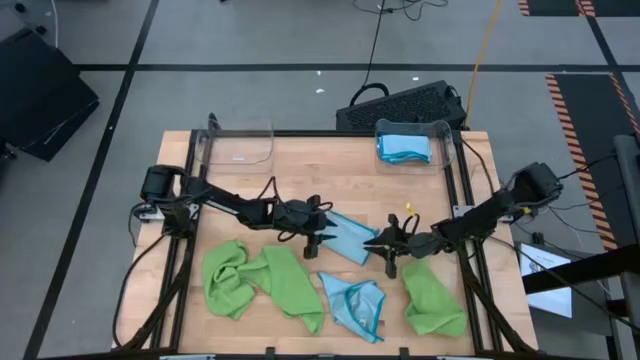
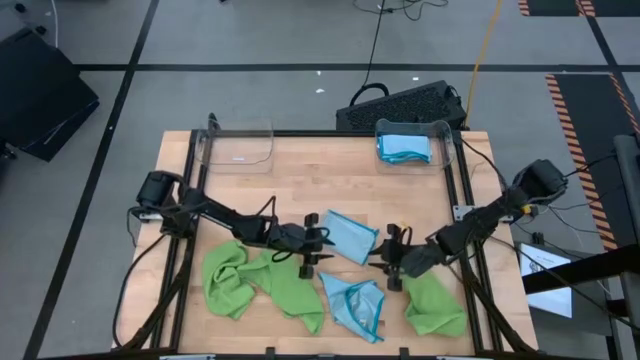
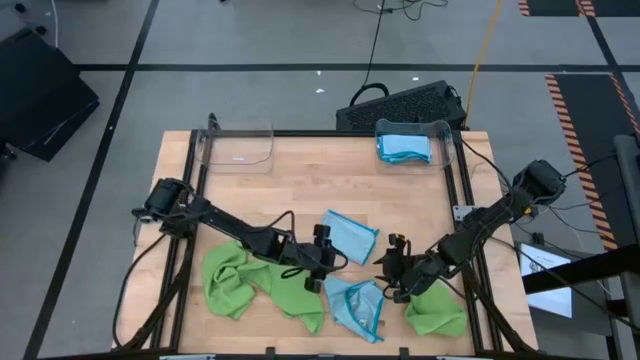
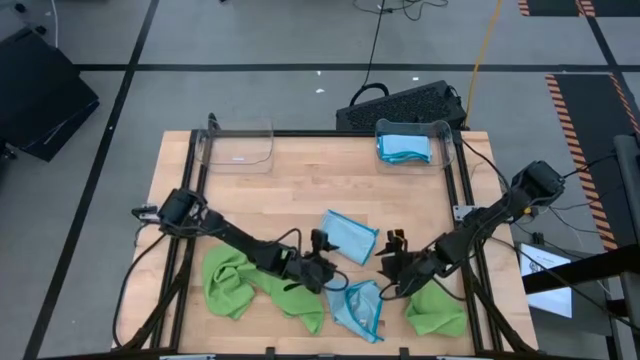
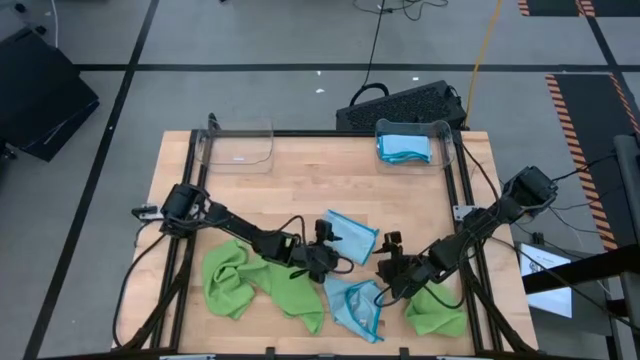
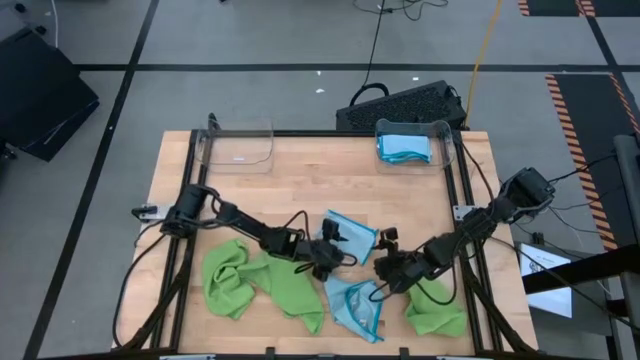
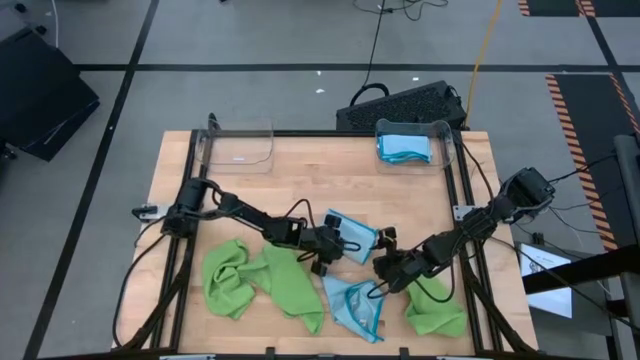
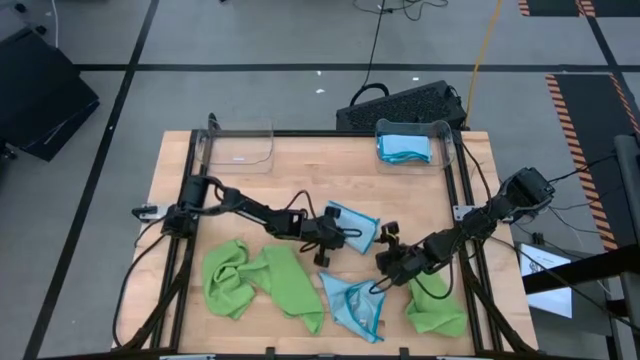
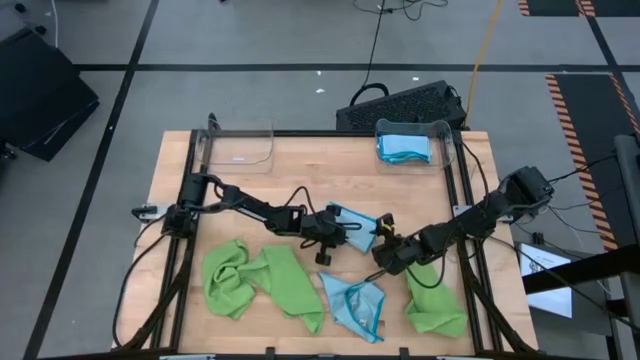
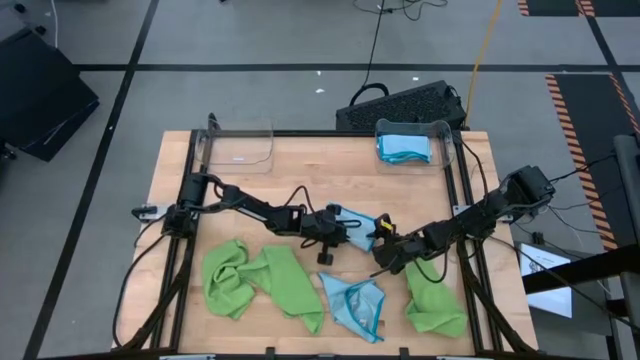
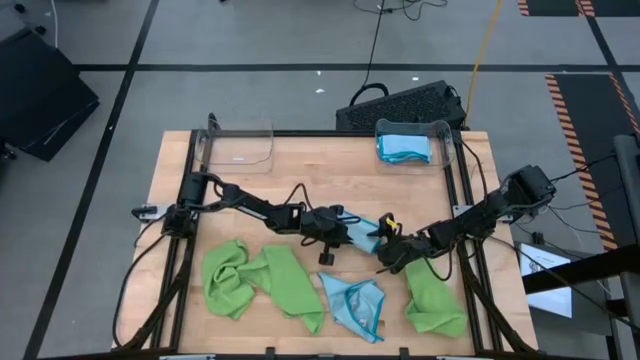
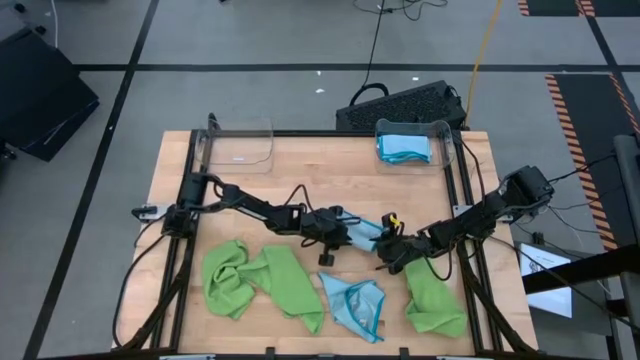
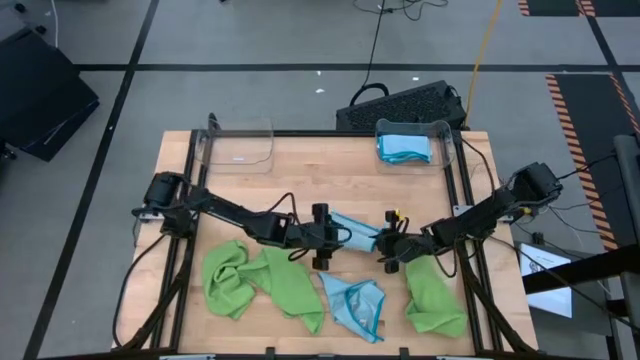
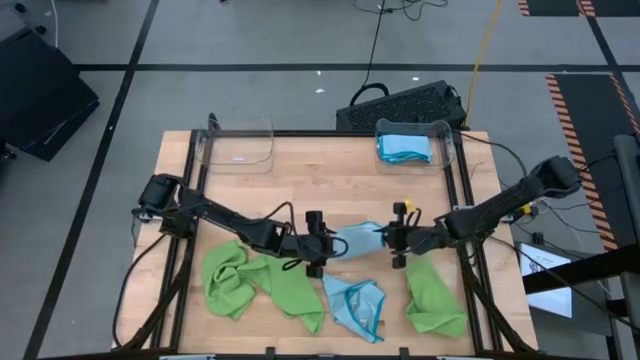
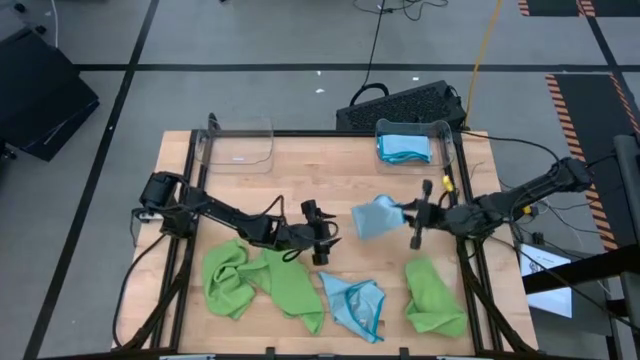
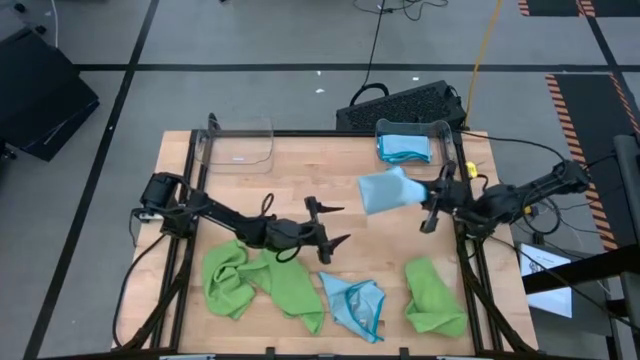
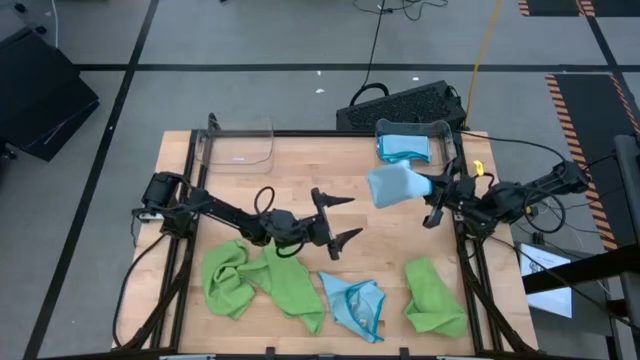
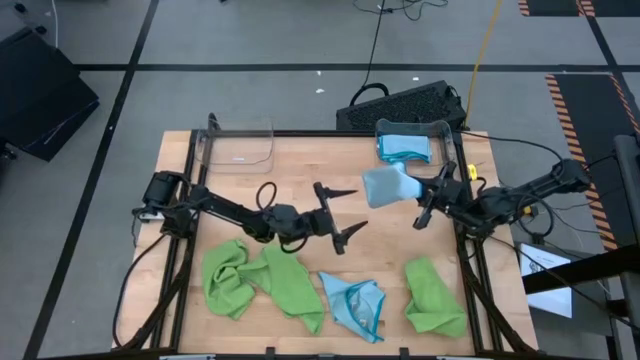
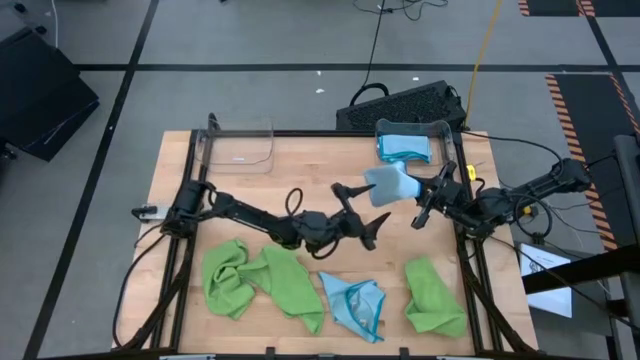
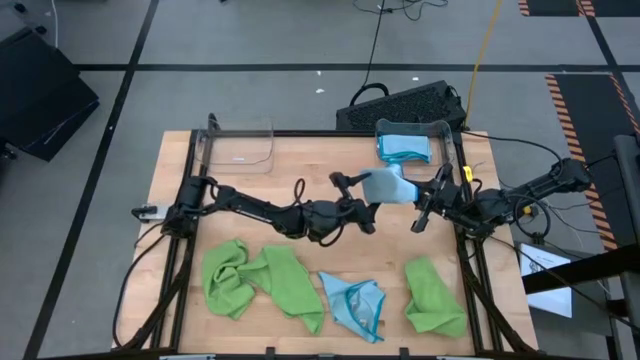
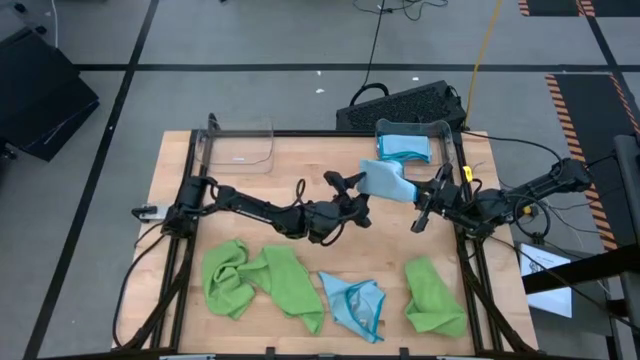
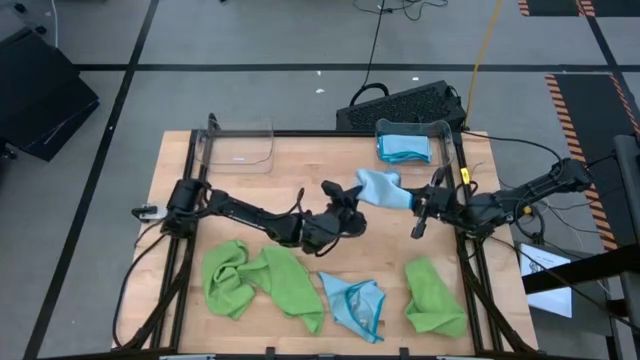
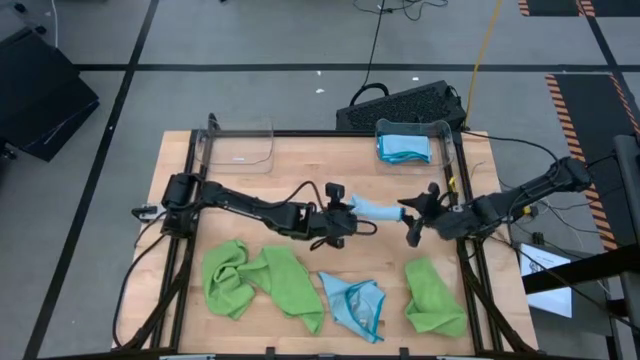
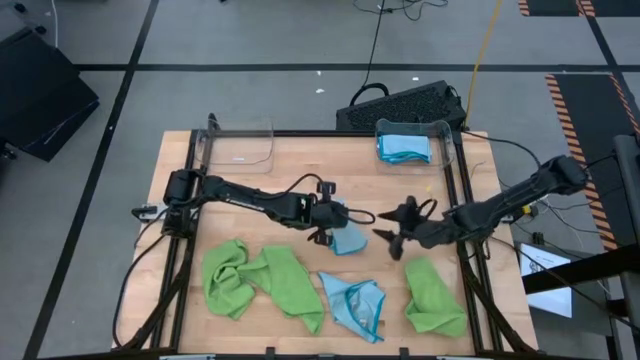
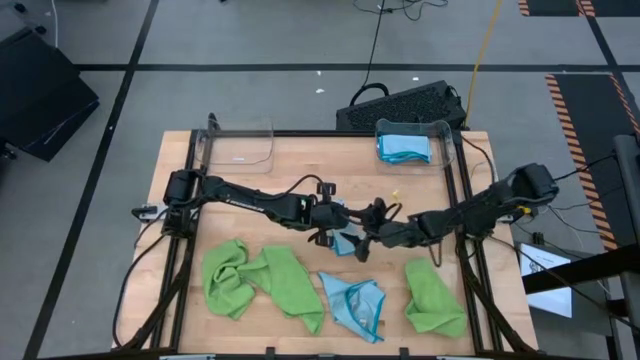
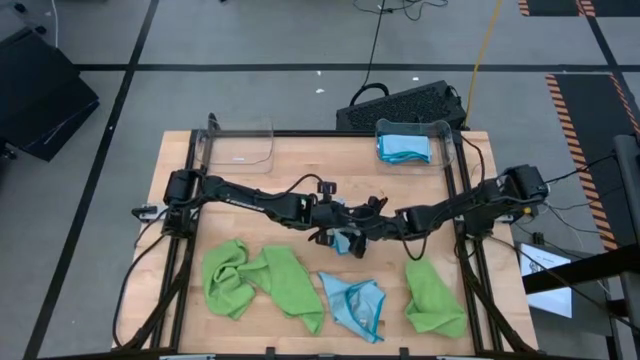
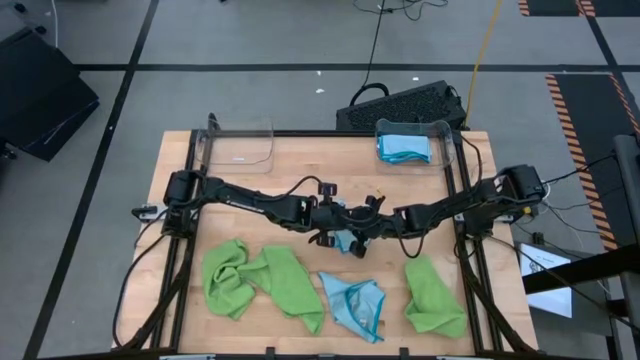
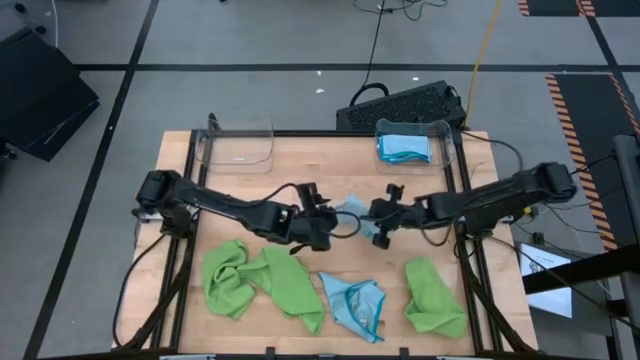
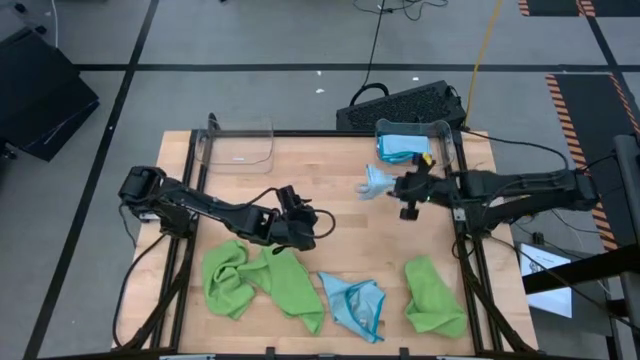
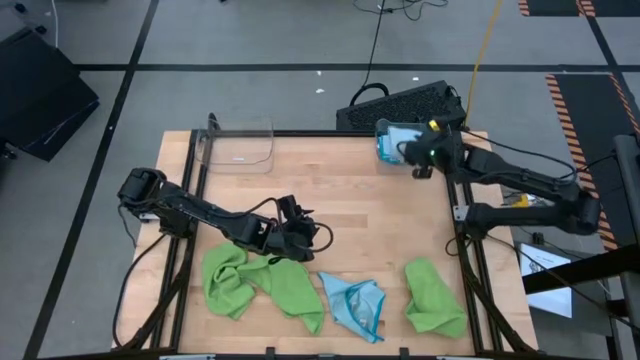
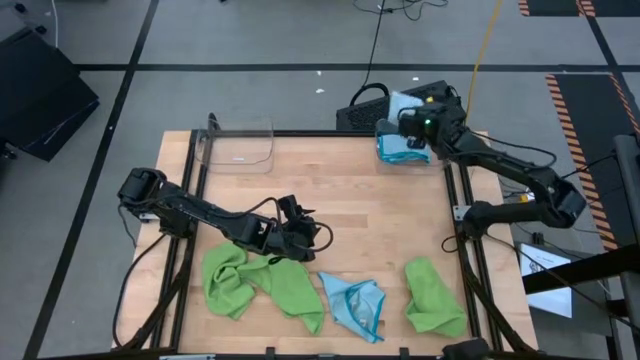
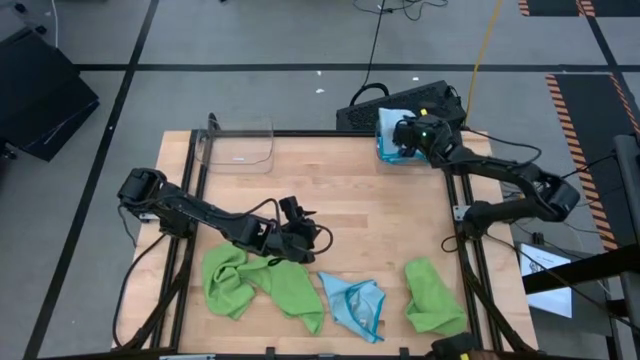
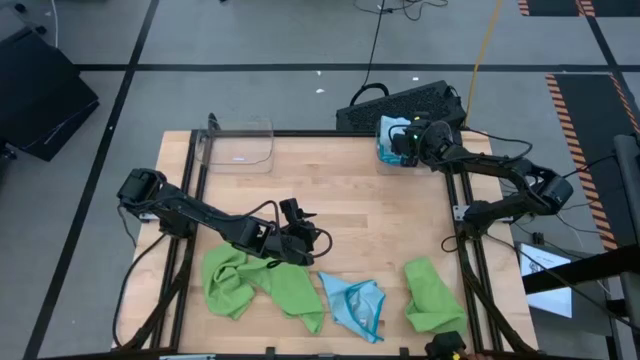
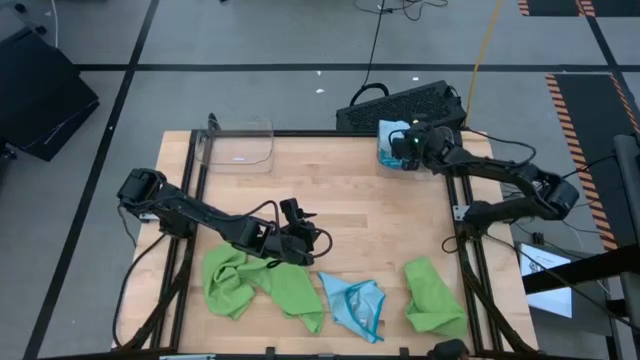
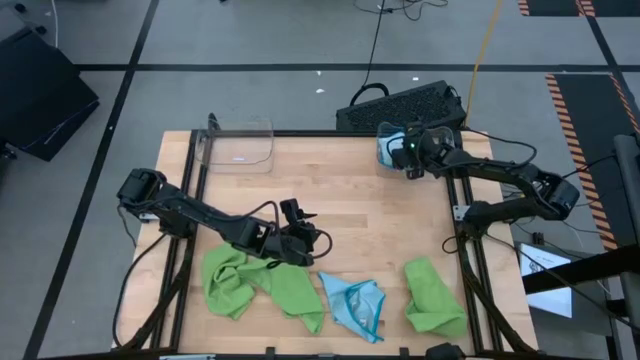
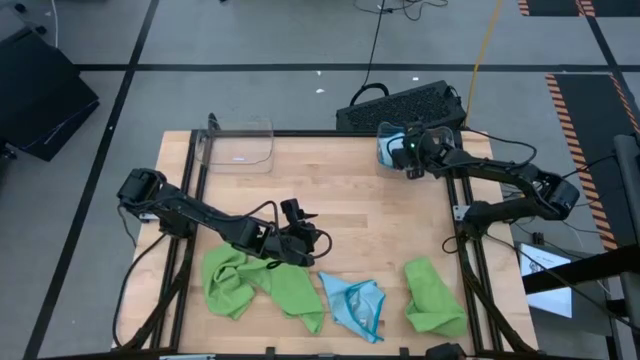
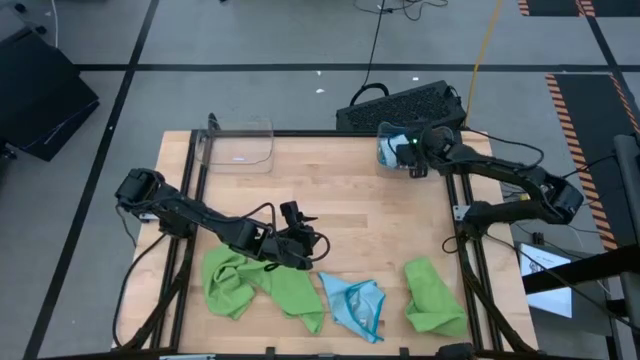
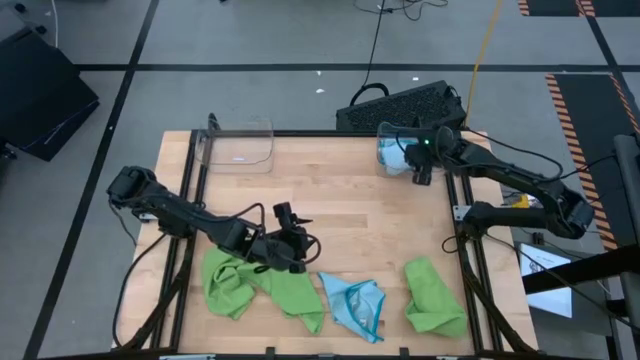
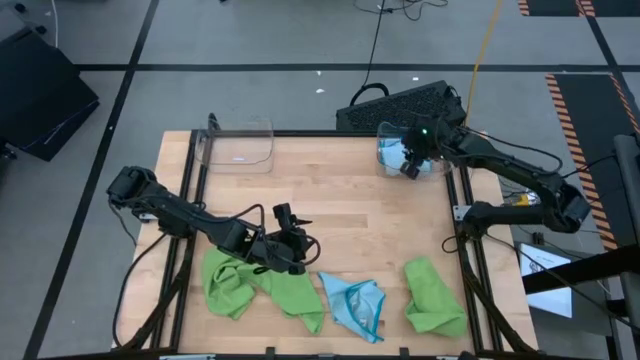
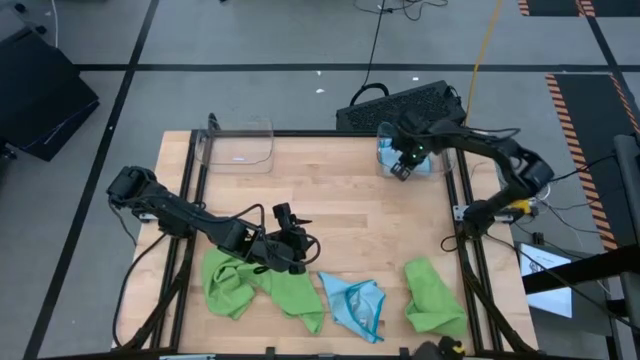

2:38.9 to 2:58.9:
Task: Fold microfiber towels
Put the folded blue microfiber cloth into the right transparent bin

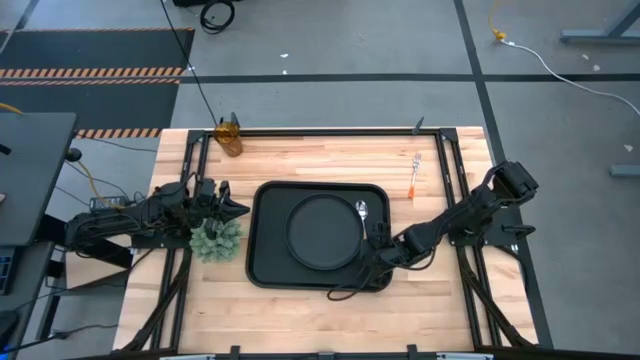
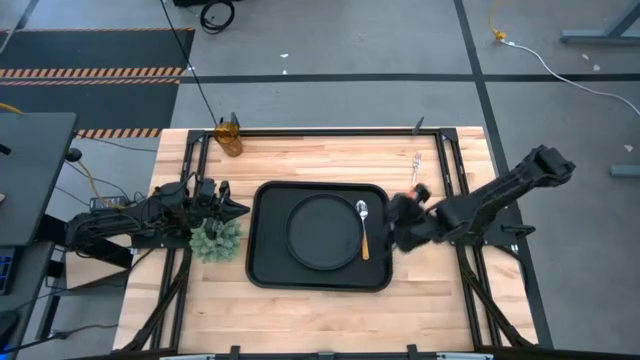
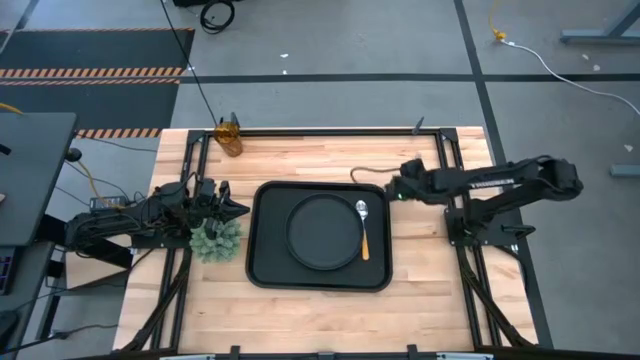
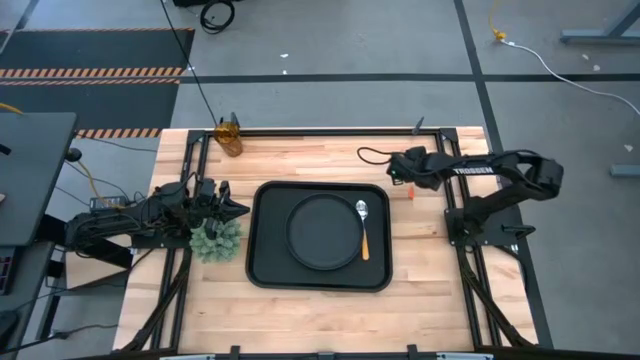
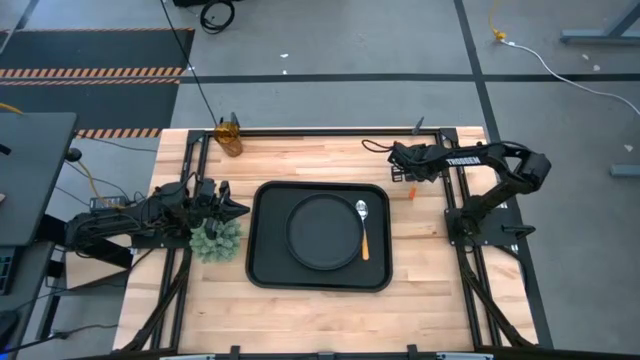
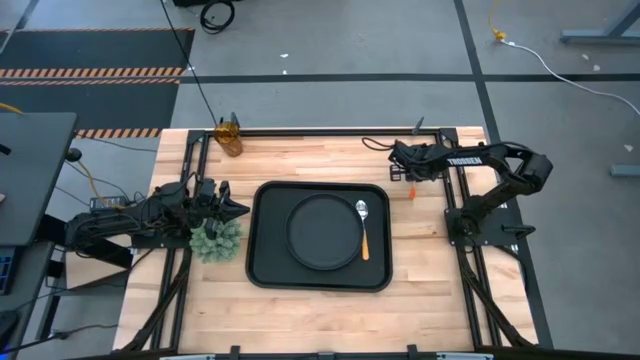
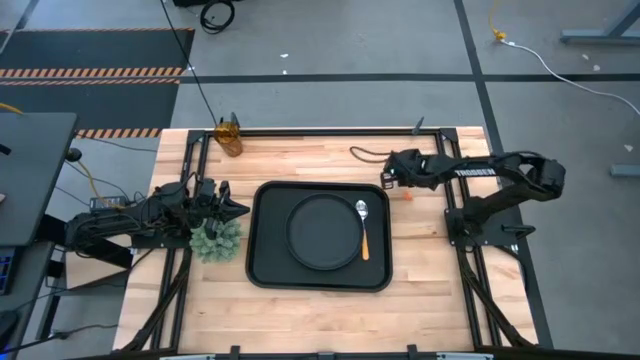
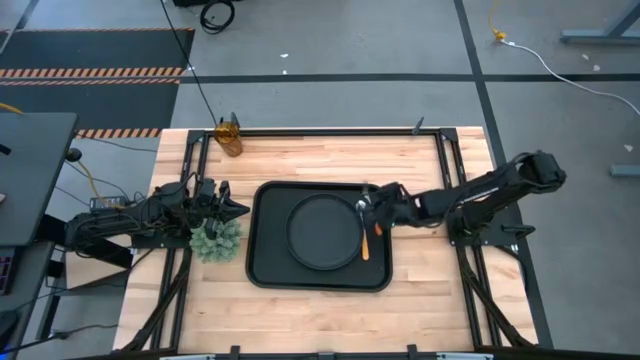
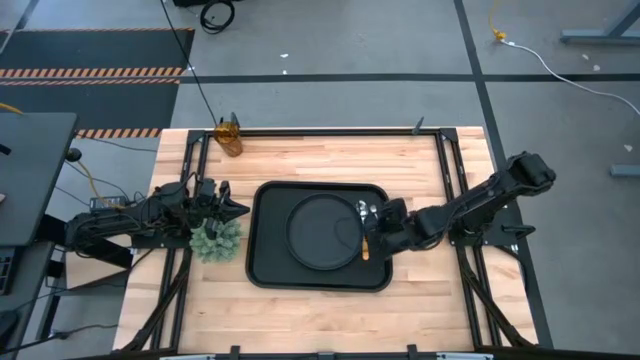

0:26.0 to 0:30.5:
Task: Pick and place plate/cup/fork/spoon on tray
Put the orange fork on the black serving tray to the right of the yellow spoon
